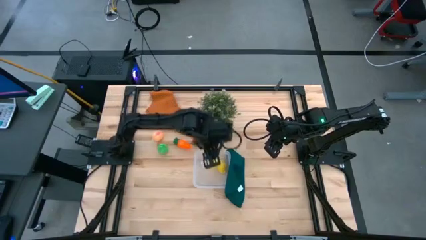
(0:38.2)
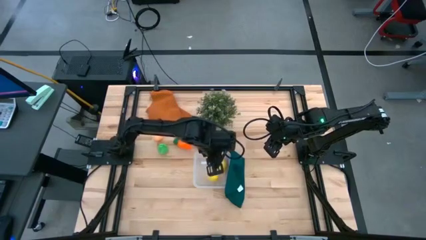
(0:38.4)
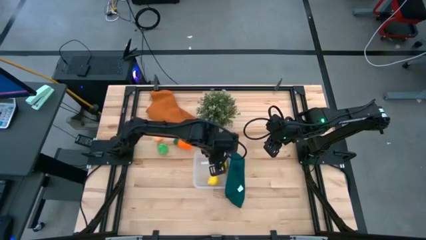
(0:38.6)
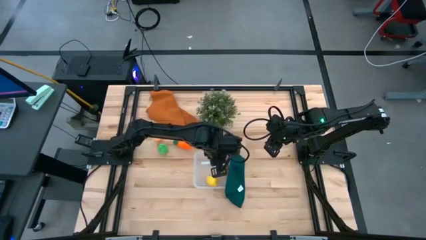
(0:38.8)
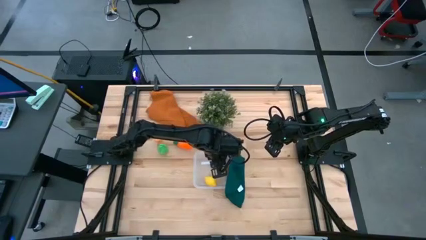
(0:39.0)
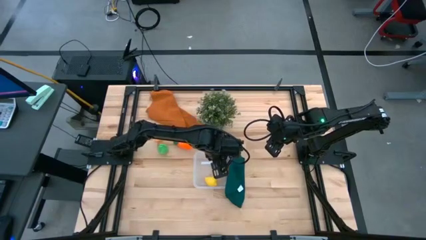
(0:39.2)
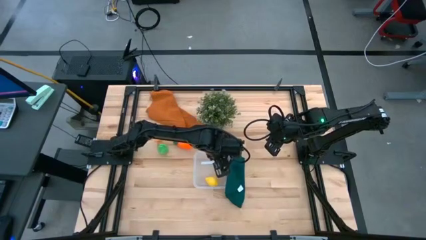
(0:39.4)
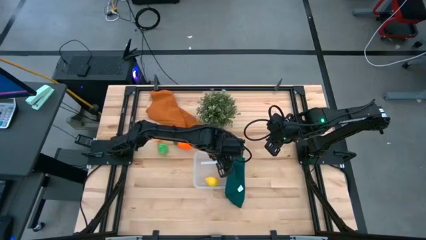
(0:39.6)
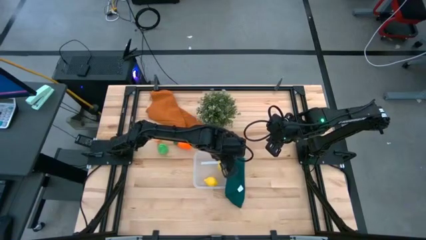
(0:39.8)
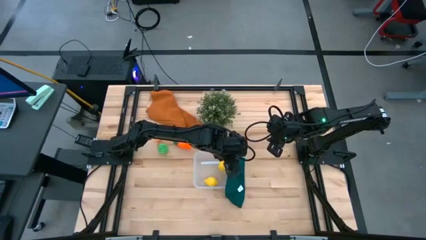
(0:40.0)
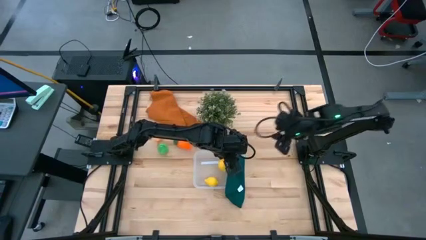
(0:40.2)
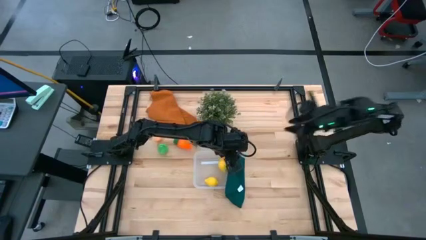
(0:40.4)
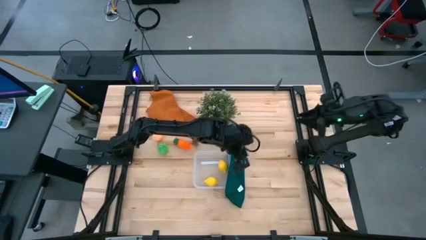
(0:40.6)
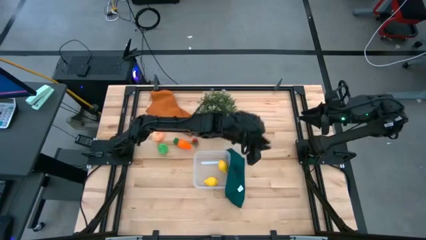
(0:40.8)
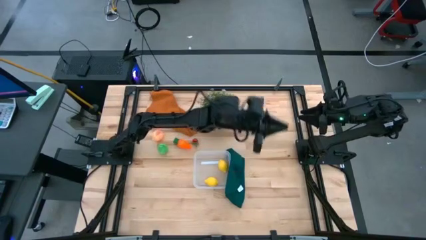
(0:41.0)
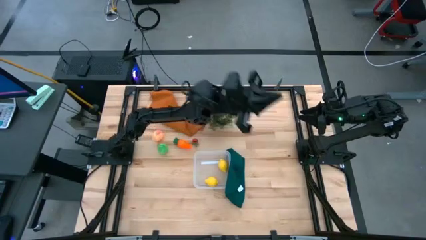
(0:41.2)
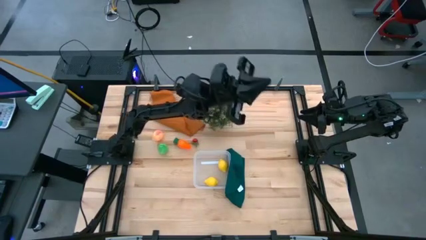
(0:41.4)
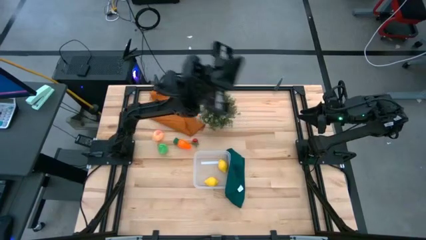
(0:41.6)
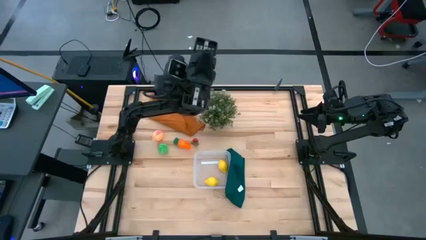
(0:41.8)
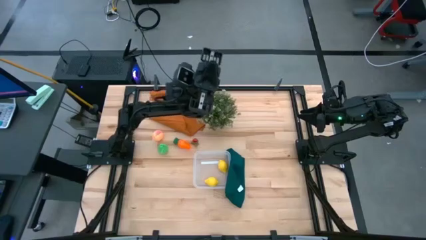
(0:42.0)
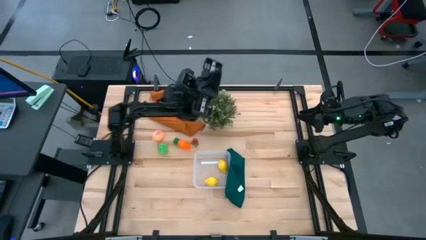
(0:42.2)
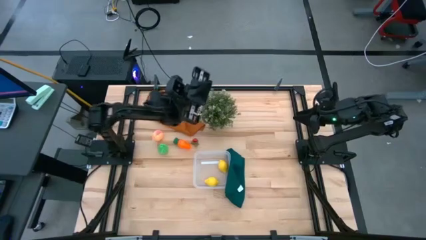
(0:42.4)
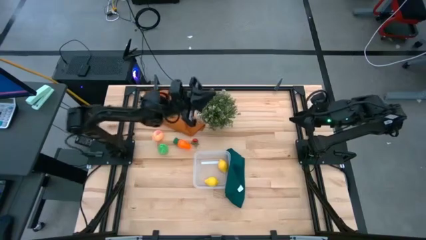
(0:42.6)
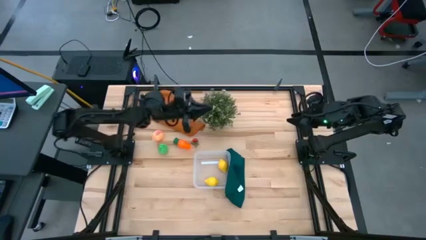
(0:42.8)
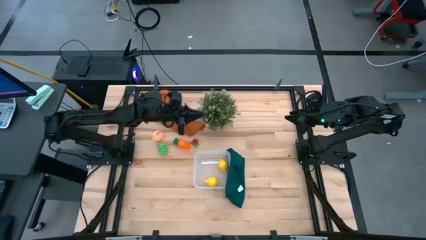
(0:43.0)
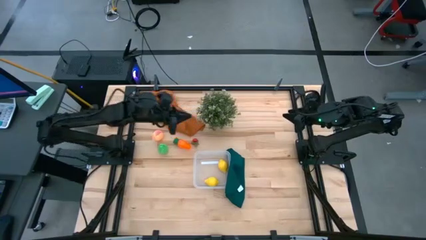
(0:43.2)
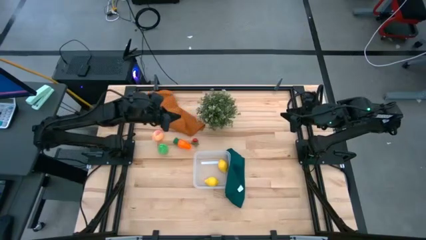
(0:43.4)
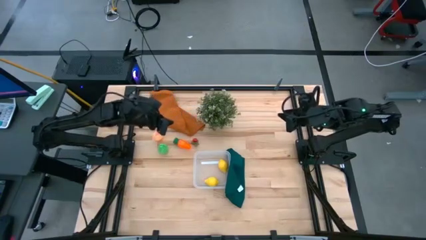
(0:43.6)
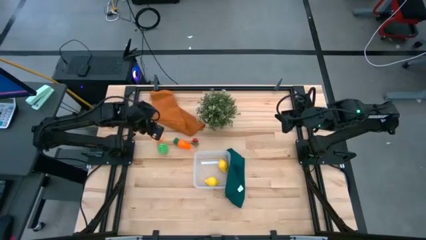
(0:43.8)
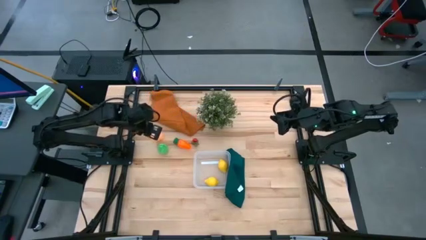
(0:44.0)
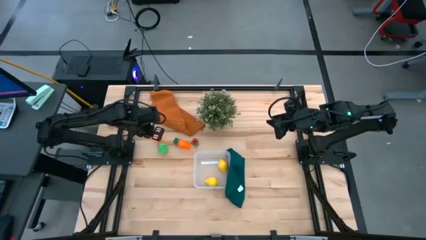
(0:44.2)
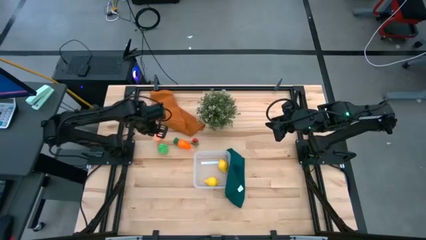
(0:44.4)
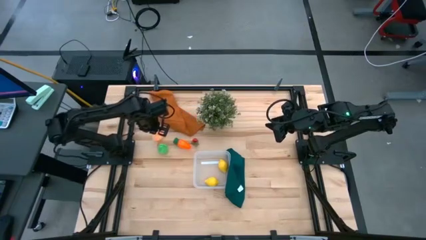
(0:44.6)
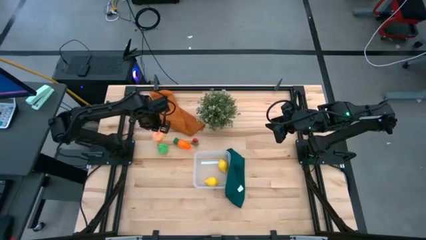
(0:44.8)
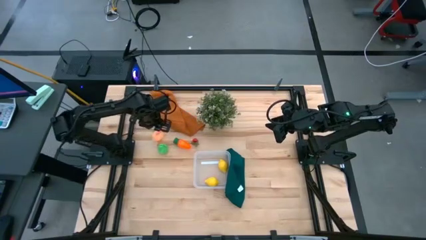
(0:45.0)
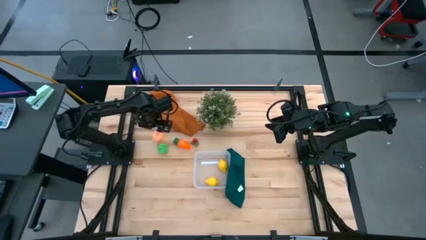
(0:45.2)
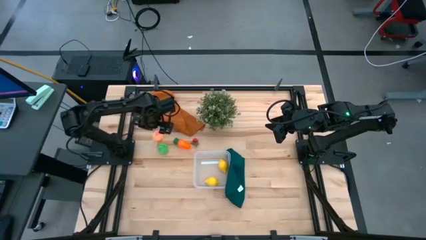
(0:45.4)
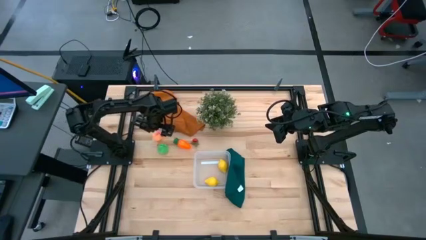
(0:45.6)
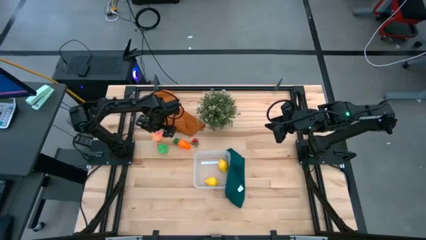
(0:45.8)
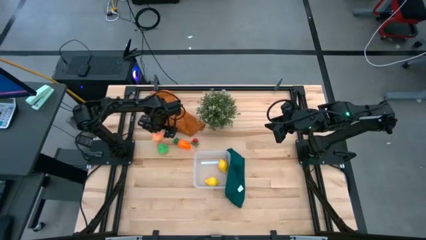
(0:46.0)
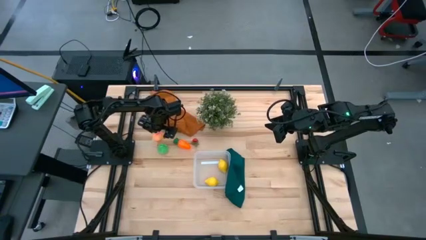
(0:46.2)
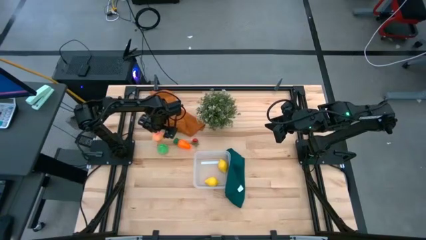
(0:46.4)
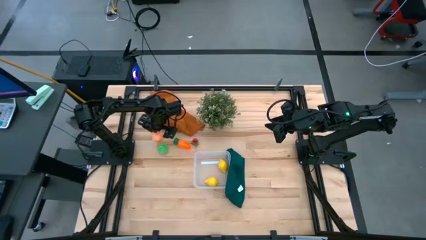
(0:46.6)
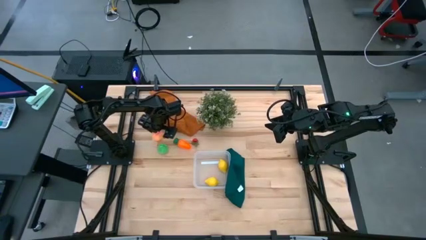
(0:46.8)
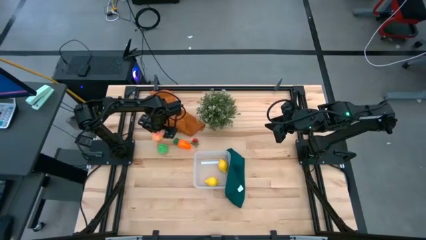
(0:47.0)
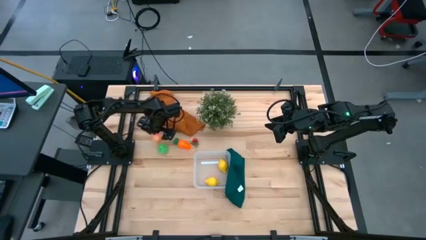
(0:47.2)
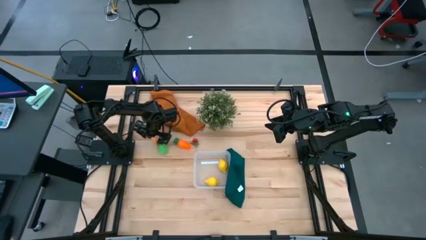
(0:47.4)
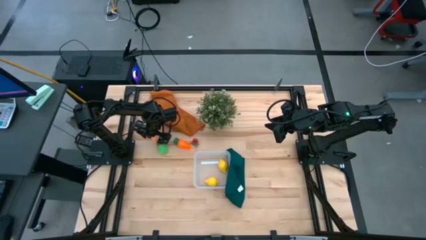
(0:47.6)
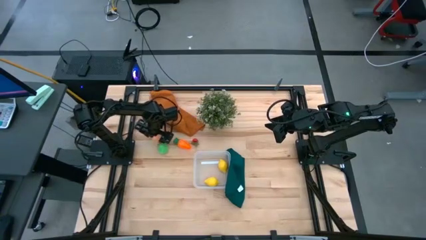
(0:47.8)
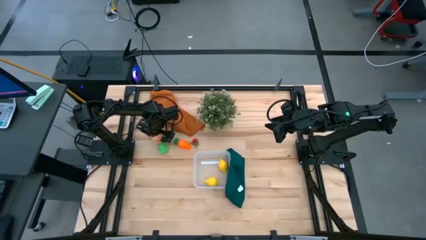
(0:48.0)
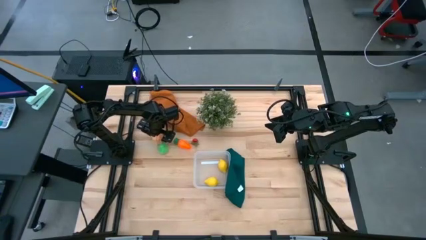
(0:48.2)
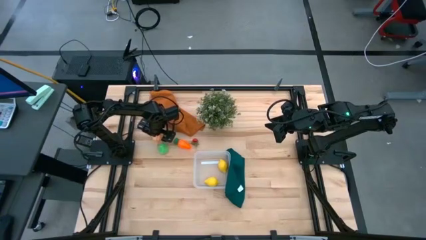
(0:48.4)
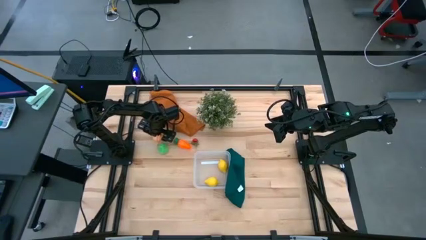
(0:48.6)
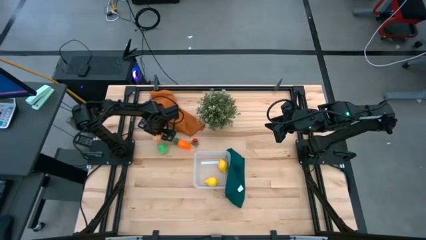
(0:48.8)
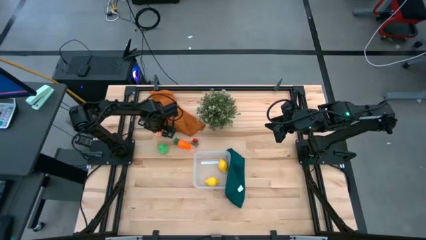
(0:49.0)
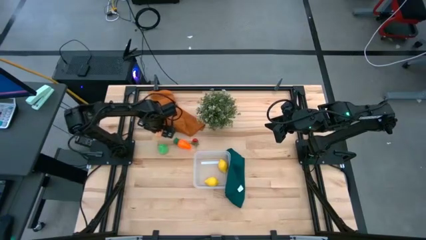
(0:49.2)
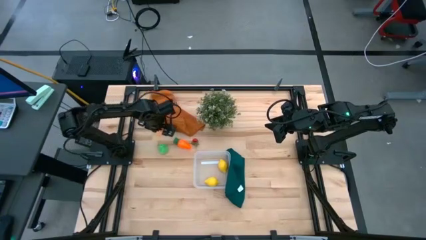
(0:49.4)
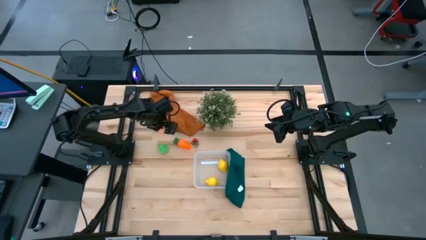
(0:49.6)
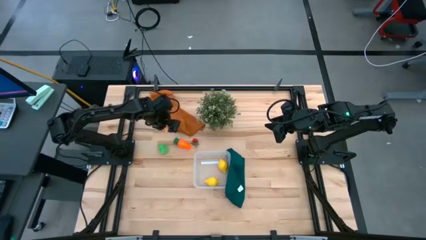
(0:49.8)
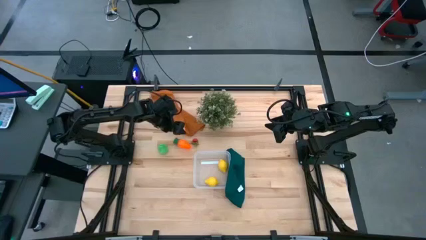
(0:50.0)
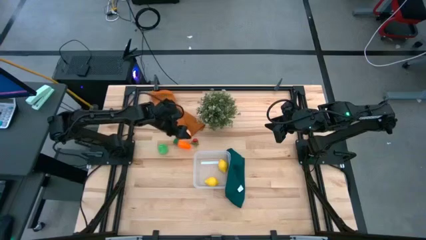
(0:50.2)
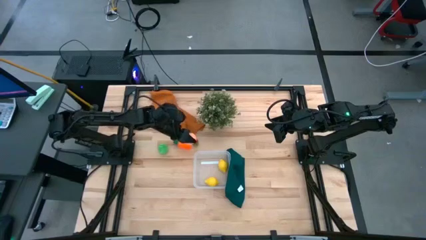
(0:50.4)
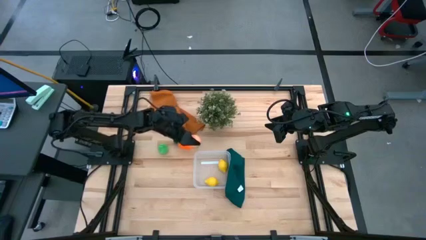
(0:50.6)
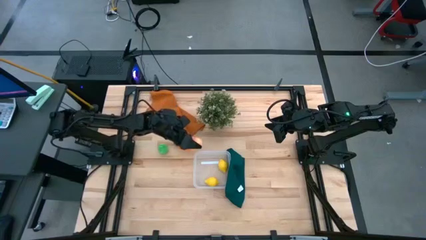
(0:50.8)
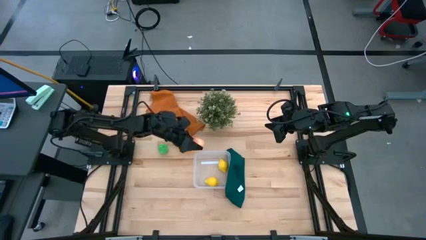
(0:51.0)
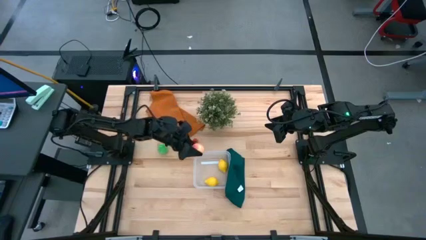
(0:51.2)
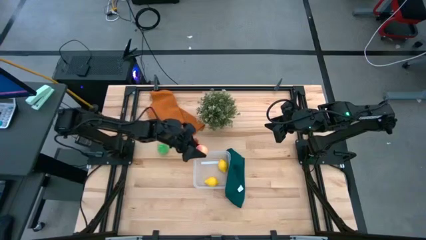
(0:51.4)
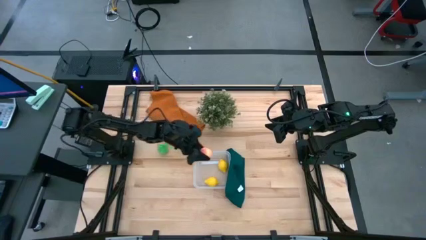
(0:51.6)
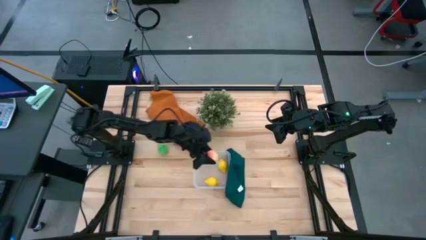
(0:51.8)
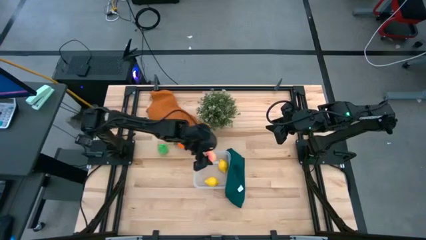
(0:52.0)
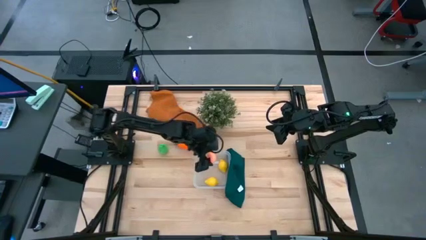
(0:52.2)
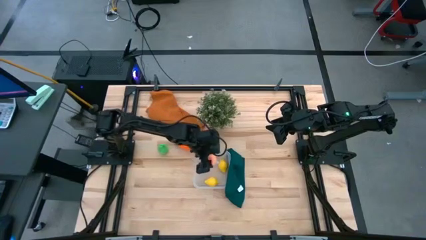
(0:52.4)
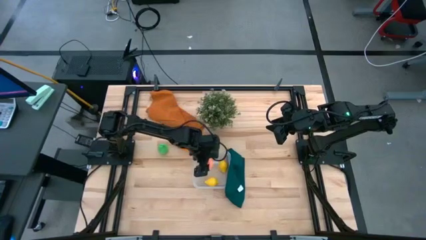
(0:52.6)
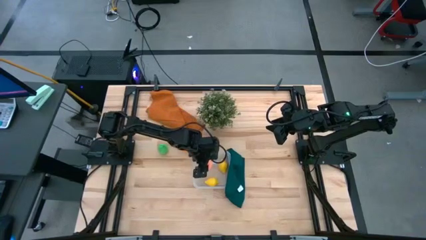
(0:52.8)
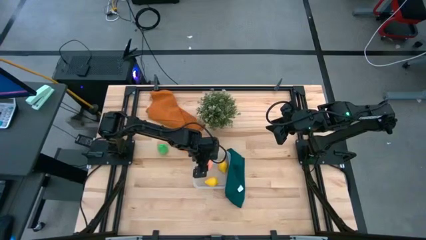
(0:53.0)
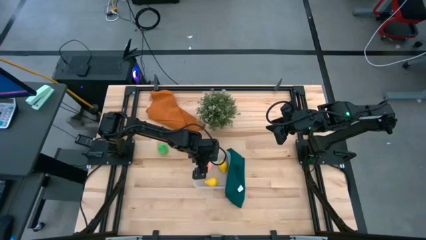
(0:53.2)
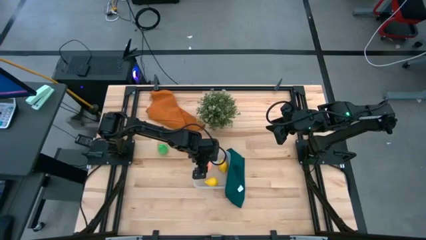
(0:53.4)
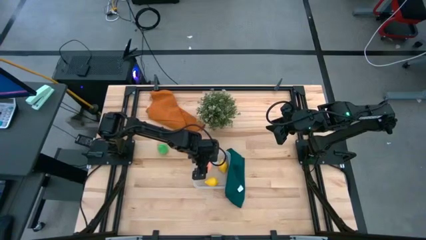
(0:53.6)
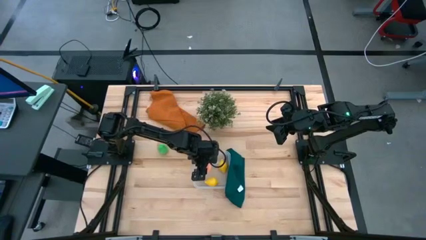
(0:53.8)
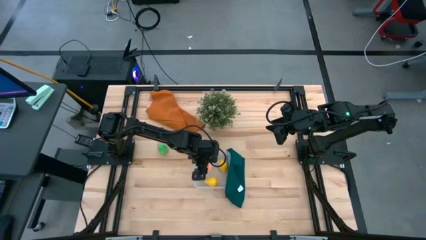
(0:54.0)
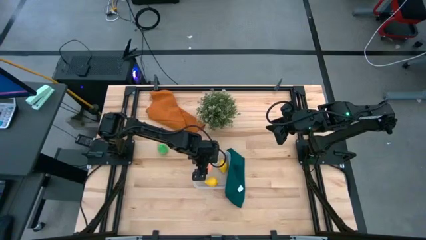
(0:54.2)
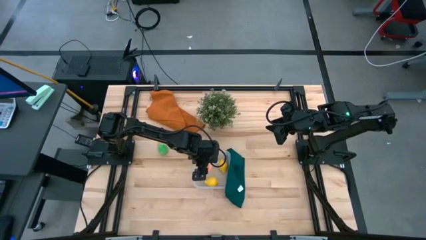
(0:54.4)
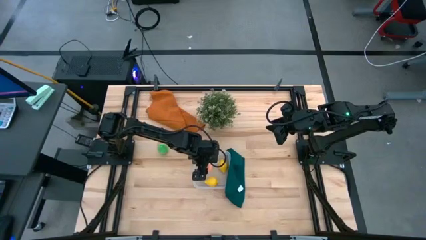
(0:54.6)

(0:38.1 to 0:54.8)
Task: Pick and placing Produce into tupperware
Put the light orange peach into the transparent bin
